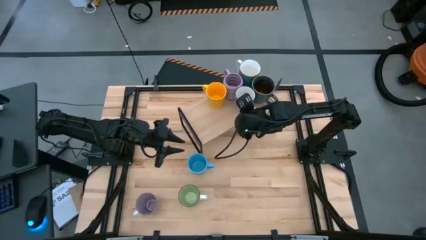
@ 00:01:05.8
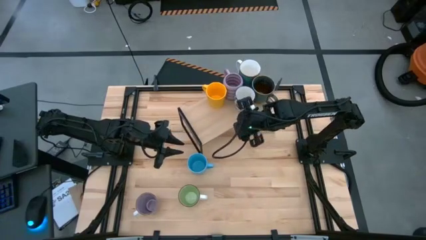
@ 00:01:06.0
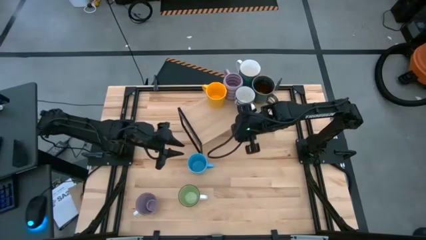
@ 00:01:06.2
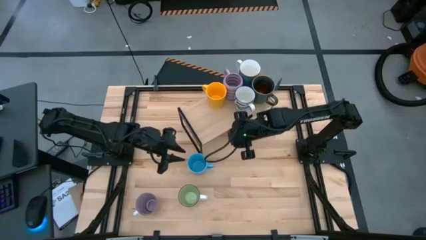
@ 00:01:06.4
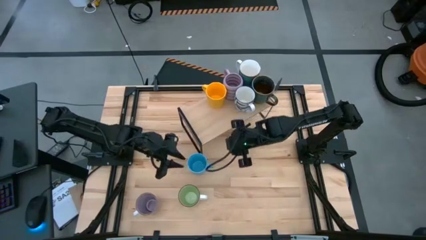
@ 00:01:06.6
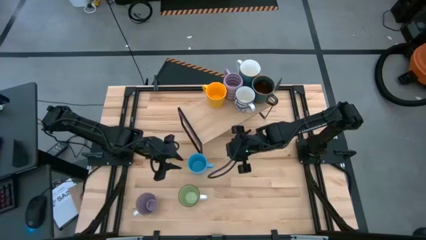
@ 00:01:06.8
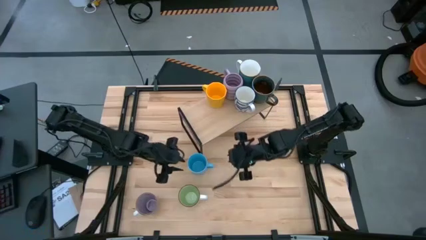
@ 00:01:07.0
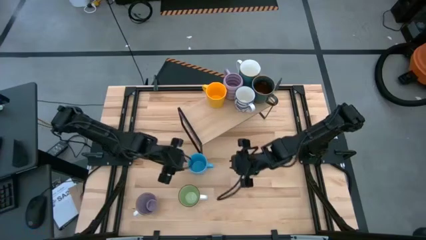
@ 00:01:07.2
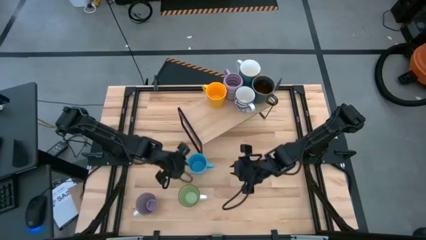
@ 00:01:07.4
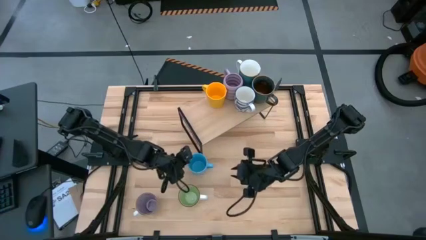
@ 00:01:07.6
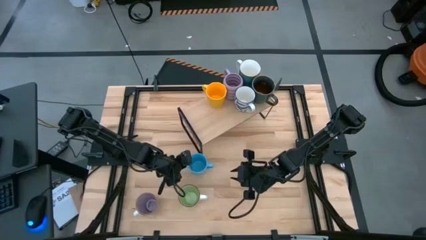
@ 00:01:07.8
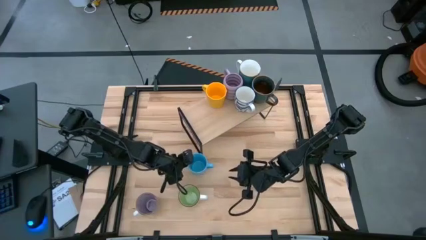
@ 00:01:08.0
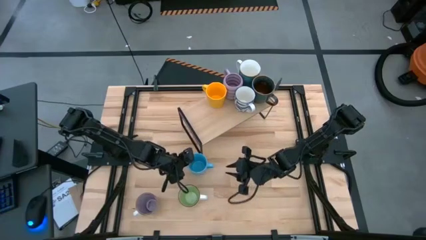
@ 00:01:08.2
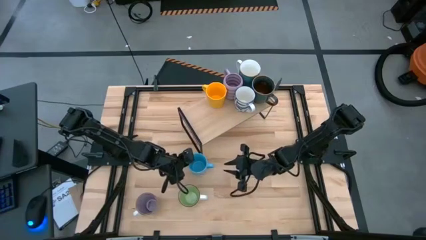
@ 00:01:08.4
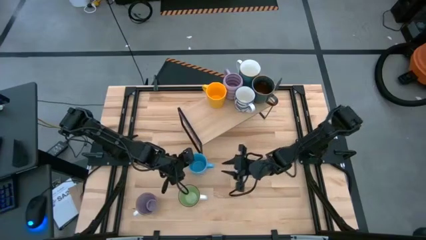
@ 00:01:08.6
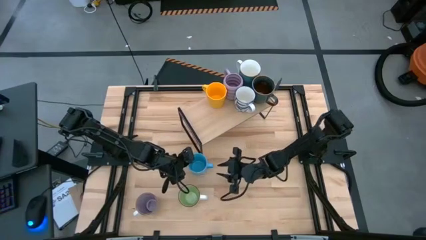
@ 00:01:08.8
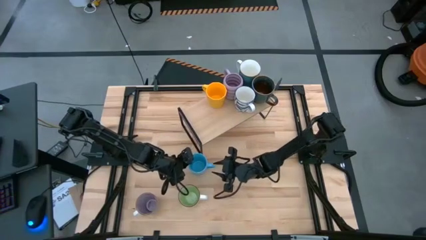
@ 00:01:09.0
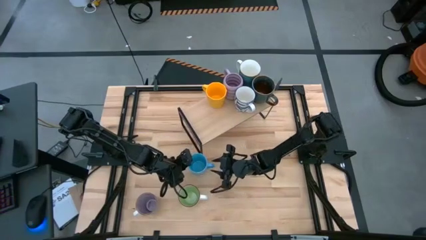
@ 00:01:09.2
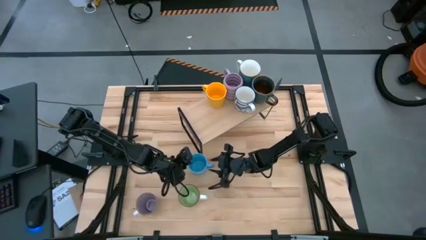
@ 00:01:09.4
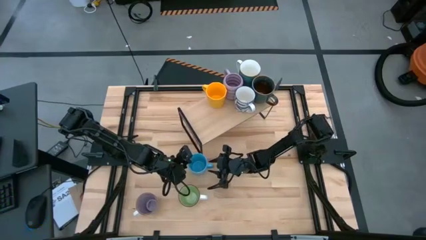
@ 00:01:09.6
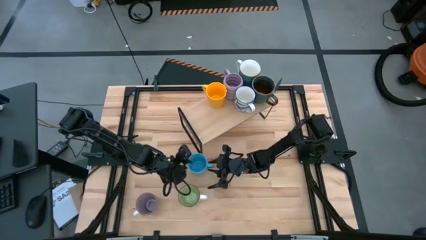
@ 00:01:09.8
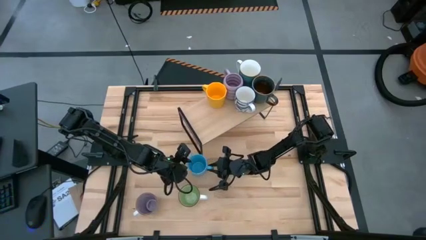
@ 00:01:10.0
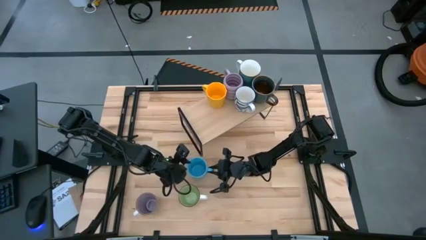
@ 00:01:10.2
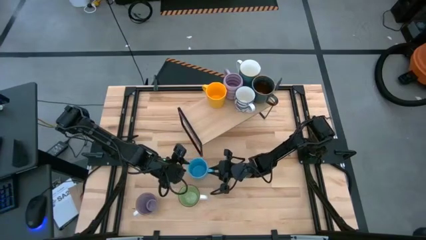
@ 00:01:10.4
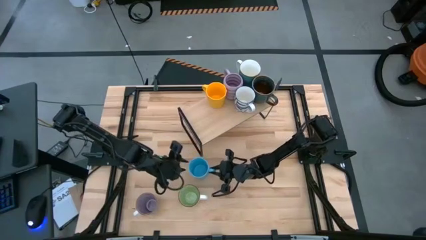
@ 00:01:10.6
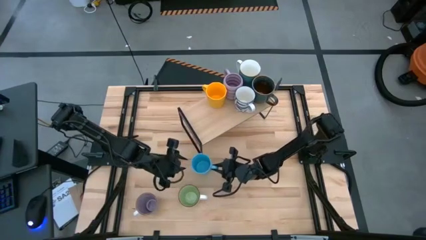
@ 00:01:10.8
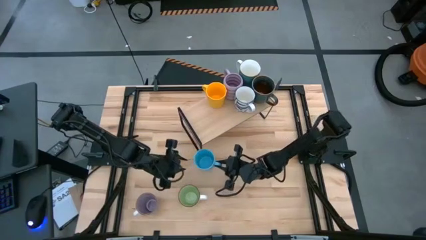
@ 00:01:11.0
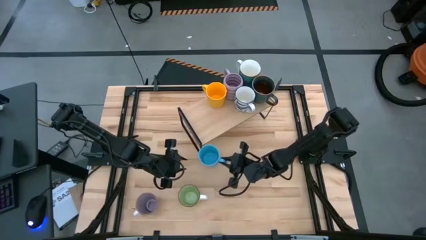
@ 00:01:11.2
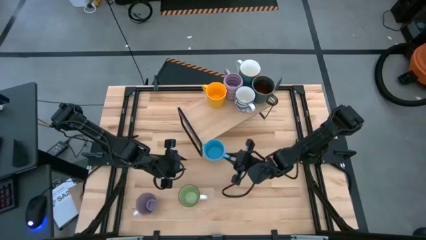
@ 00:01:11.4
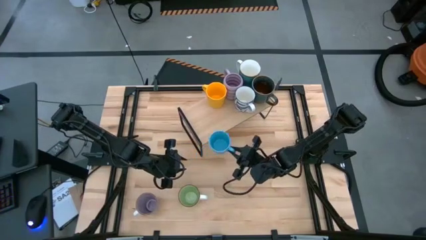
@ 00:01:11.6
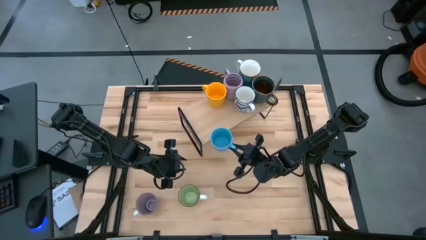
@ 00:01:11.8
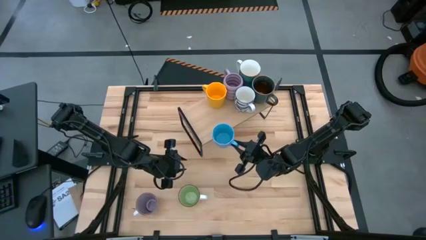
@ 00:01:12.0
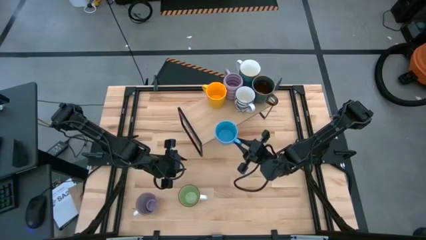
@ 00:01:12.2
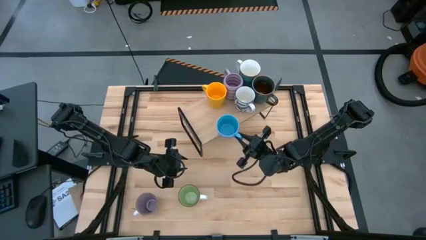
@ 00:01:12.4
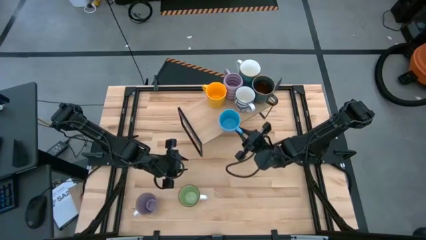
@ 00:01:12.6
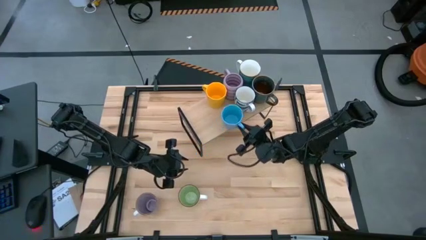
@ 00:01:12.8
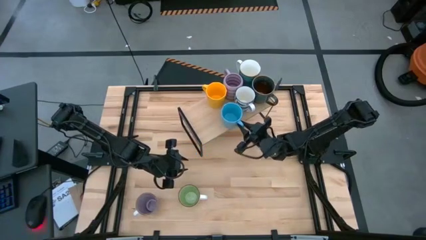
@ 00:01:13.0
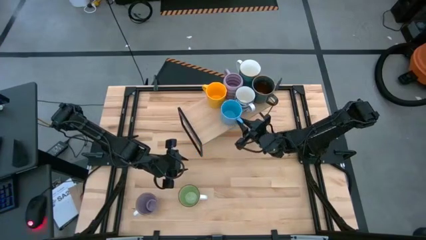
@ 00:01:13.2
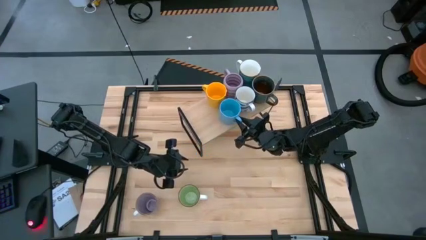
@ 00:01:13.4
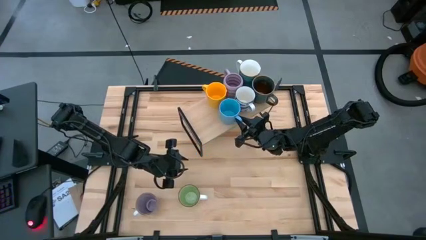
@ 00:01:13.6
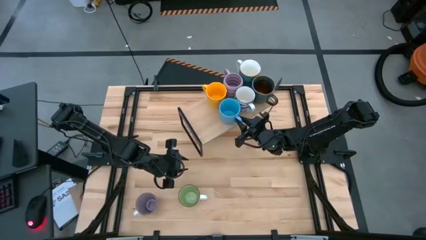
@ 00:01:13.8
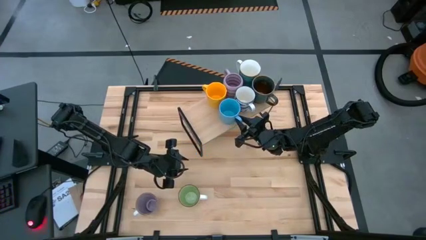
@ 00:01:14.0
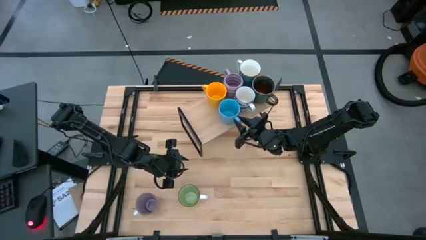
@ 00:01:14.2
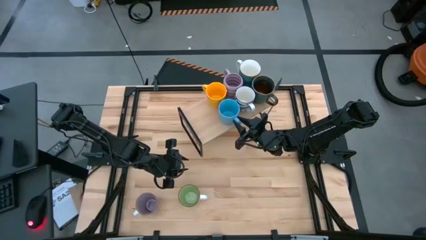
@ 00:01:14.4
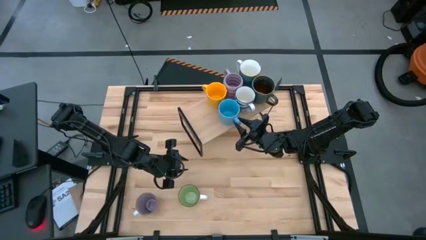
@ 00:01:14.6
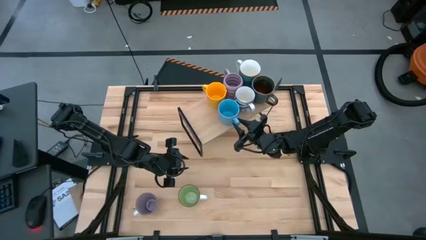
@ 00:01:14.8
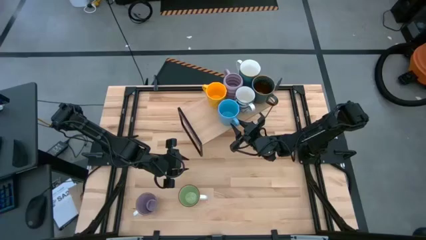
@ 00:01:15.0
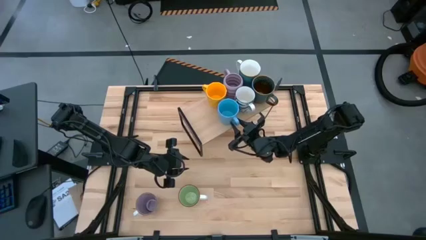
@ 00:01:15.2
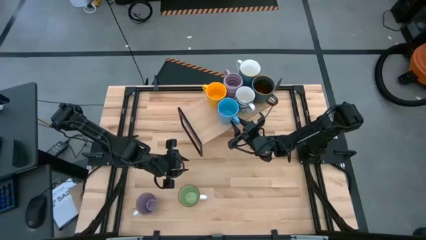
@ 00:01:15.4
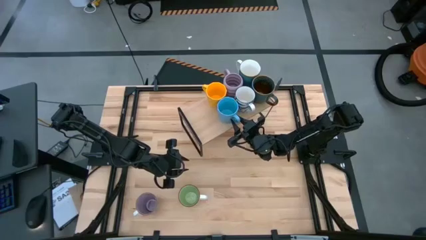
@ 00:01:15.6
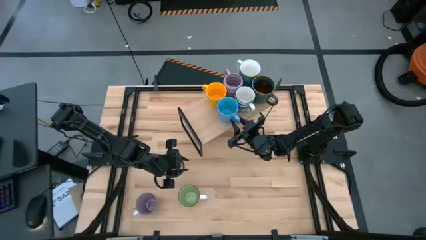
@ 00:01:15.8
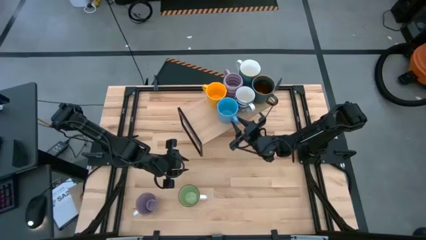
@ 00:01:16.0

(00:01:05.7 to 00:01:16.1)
Task: Place coffee mugs
Put the blue mug on the shelf

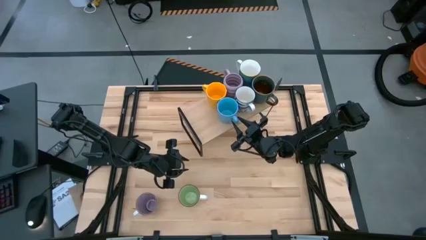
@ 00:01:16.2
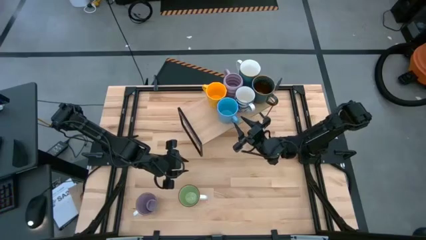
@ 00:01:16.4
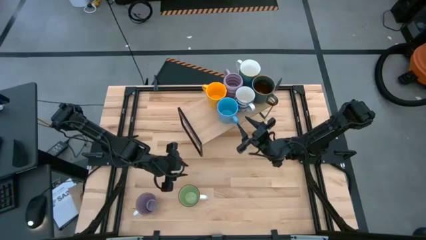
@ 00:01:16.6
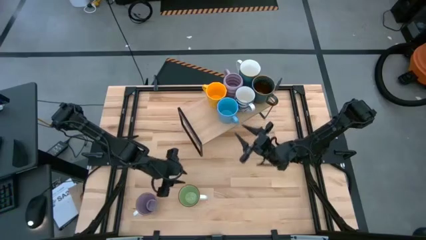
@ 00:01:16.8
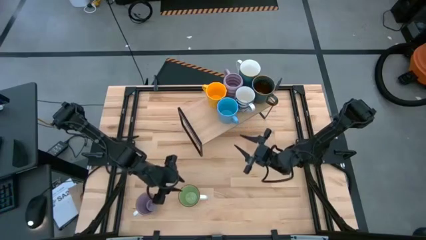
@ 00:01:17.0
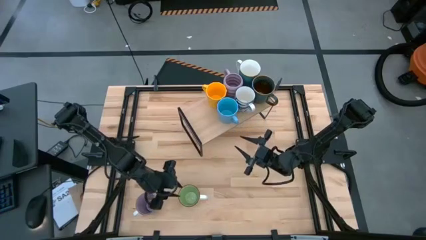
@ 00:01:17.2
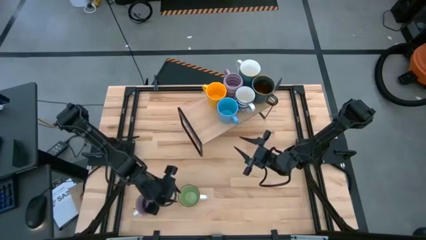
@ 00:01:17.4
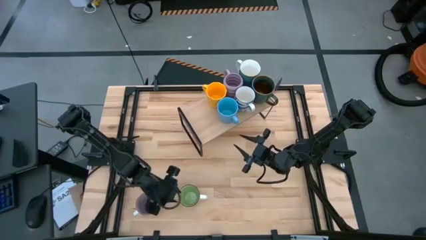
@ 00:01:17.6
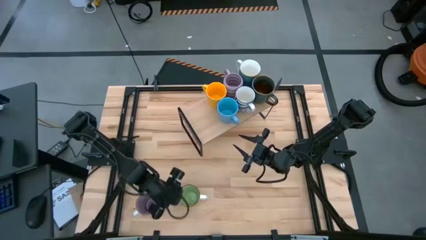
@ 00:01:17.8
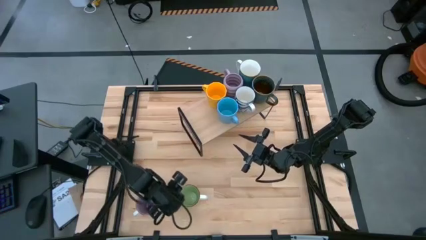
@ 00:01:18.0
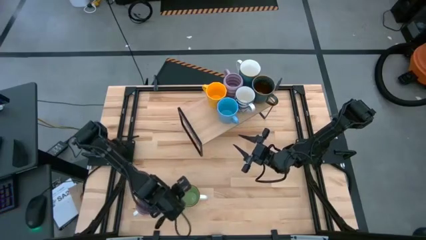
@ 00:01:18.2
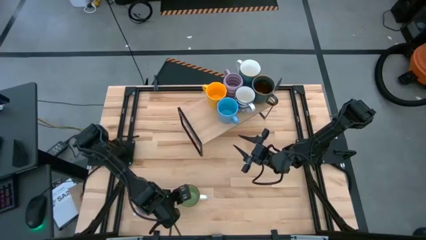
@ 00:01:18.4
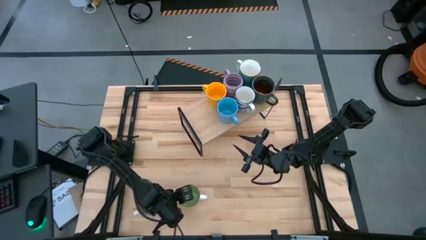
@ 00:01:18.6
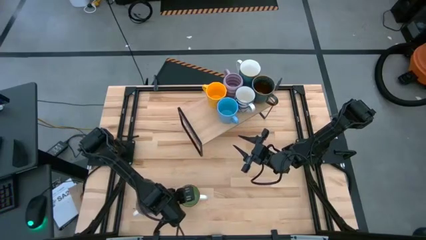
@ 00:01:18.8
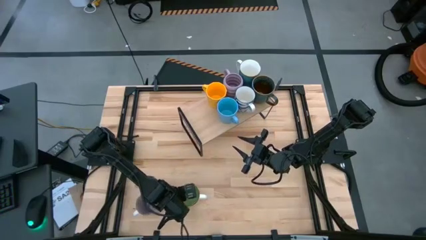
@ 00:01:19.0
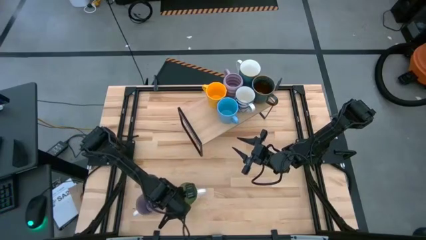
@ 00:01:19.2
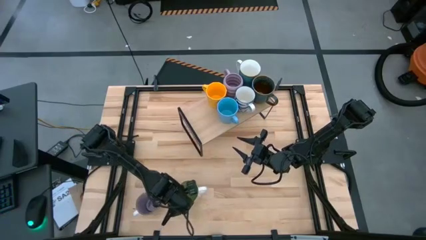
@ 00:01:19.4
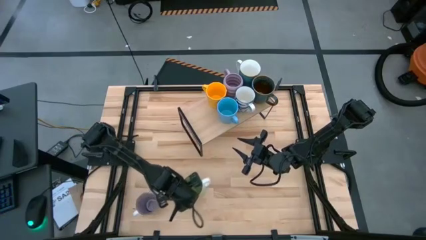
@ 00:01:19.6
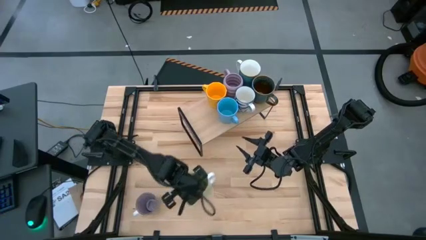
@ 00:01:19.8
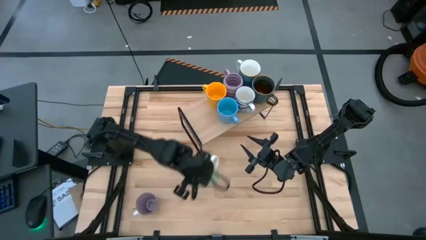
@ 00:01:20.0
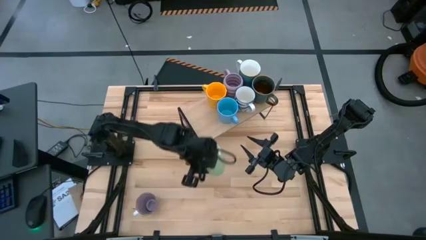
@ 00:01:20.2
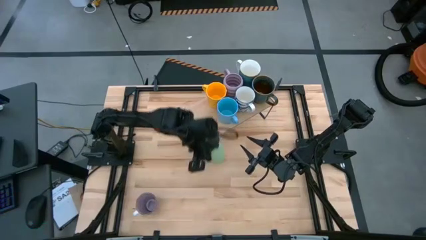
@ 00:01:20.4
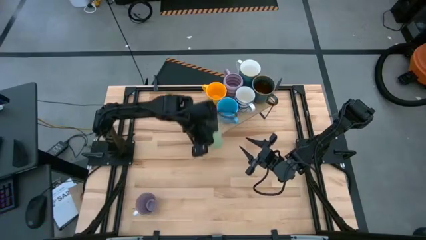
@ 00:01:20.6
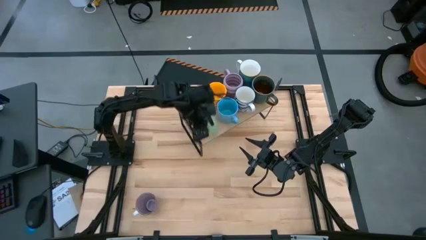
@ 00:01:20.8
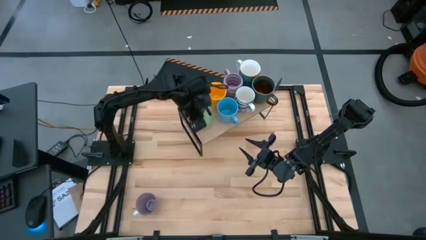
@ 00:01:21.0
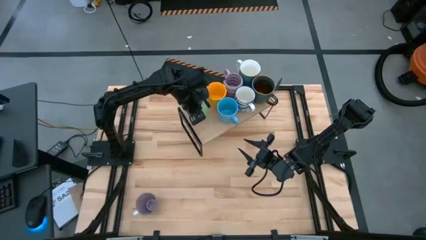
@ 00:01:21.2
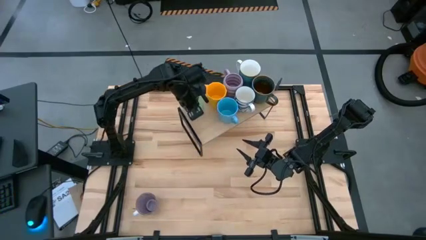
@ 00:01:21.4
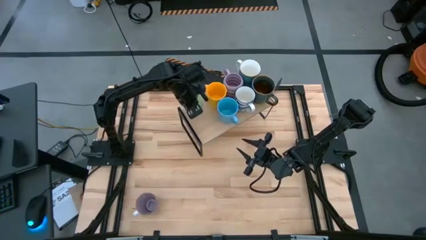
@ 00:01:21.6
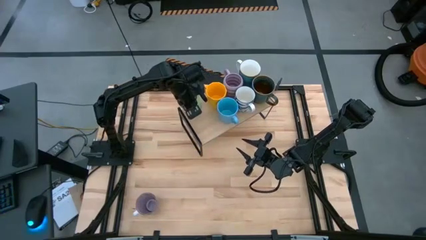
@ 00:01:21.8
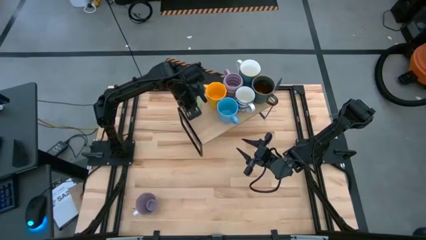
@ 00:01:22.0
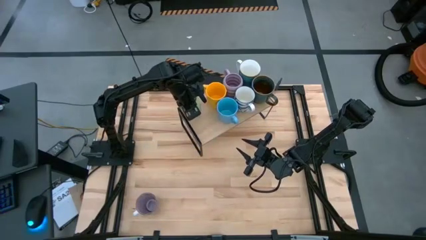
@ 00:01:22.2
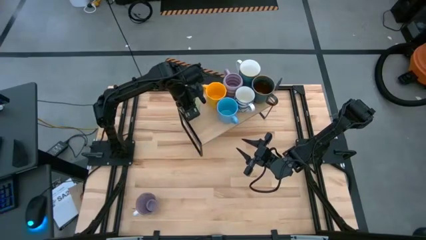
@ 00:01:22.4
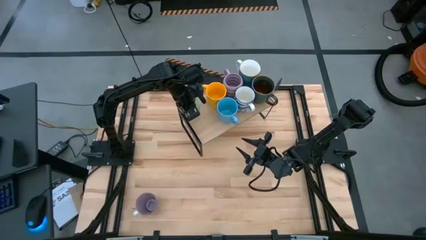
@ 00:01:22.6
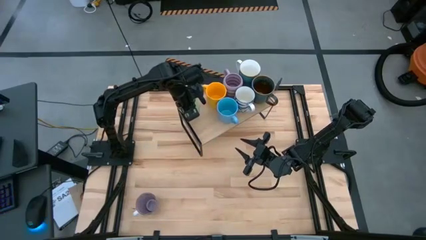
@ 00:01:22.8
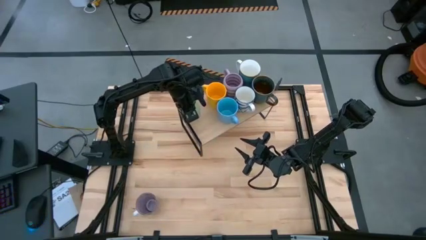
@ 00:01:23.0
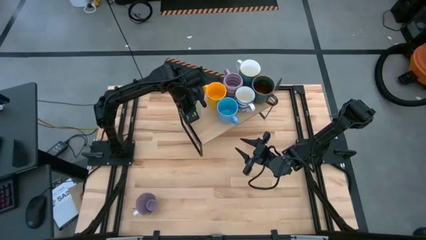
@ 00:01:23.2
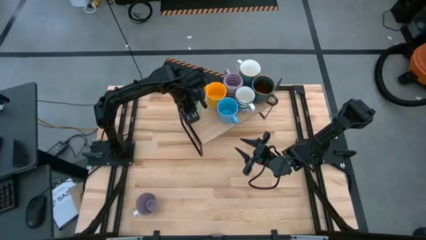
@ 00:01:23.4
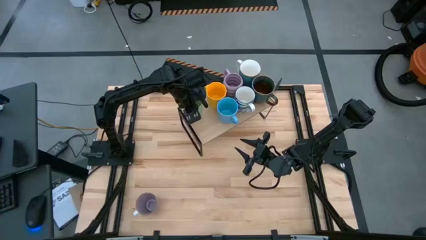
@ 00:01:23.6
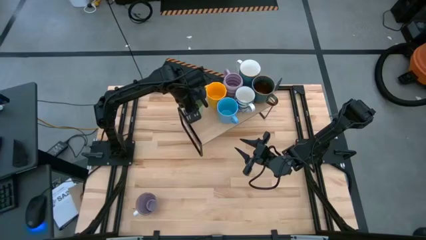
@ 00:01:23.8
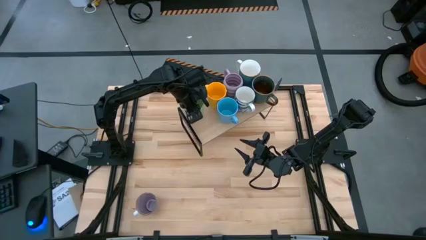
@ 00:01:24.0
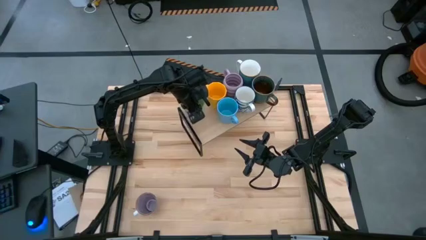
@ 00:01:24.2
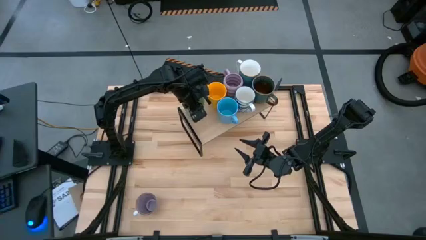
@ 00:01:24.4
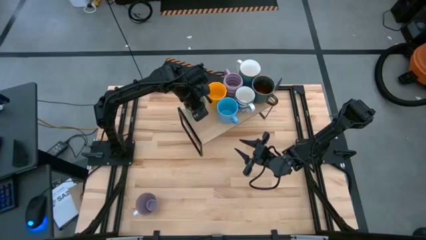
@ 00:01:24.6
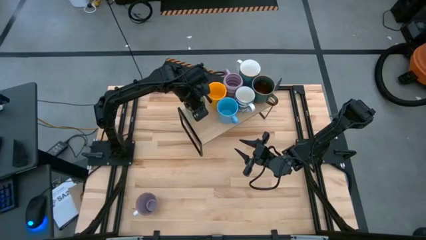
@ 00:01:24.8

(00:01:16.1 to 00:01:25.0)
Put the green mug on the shelf
